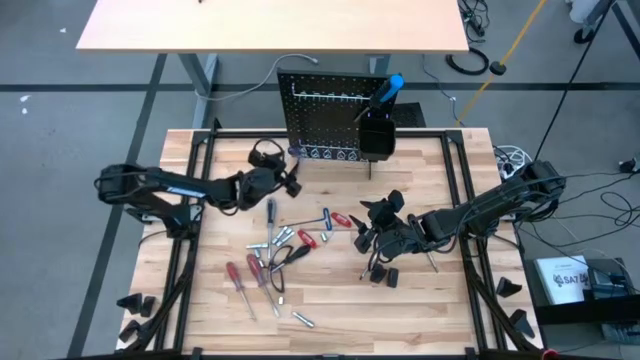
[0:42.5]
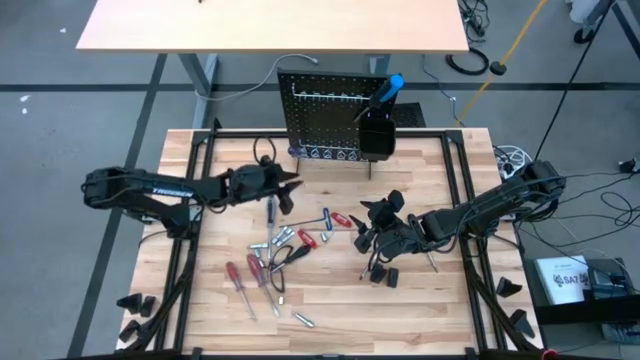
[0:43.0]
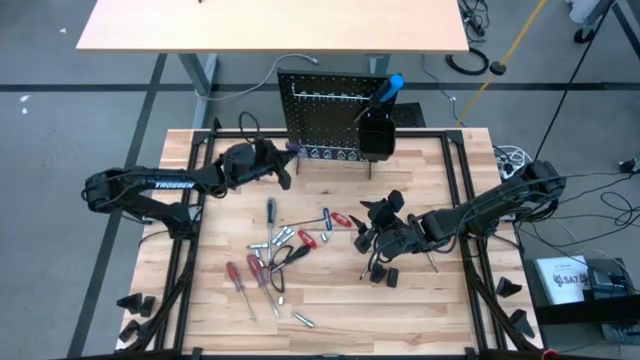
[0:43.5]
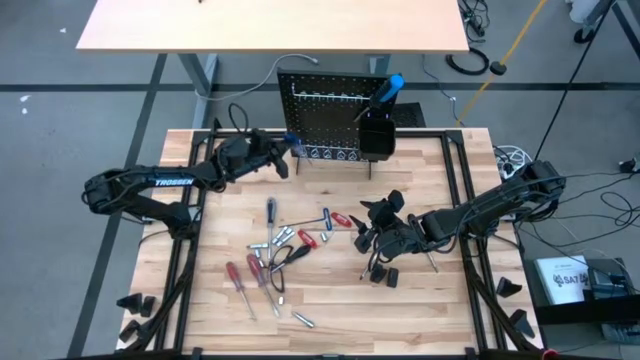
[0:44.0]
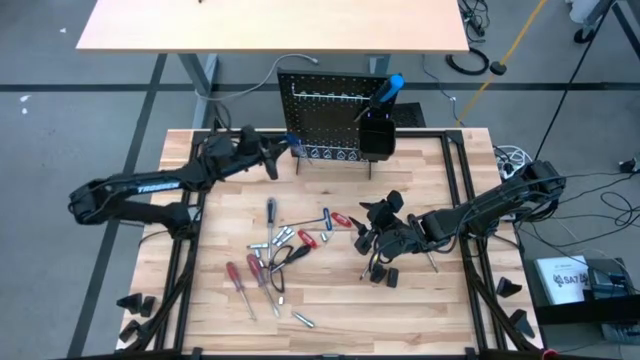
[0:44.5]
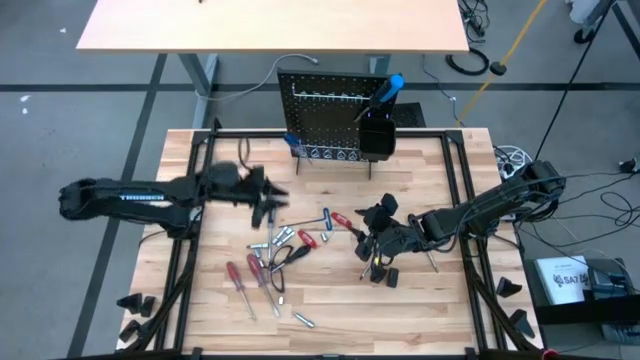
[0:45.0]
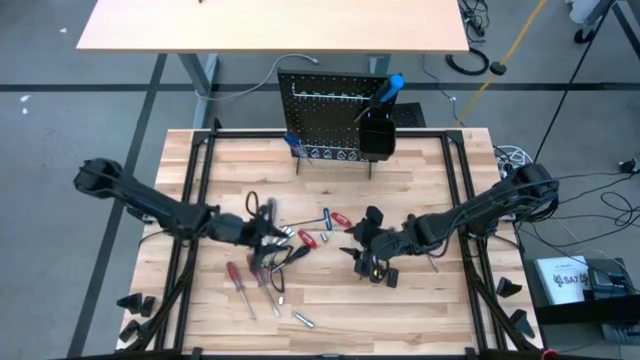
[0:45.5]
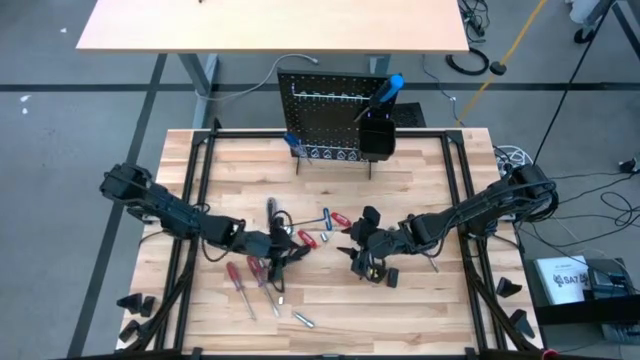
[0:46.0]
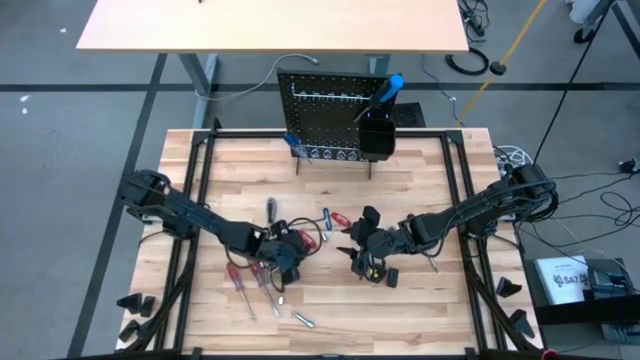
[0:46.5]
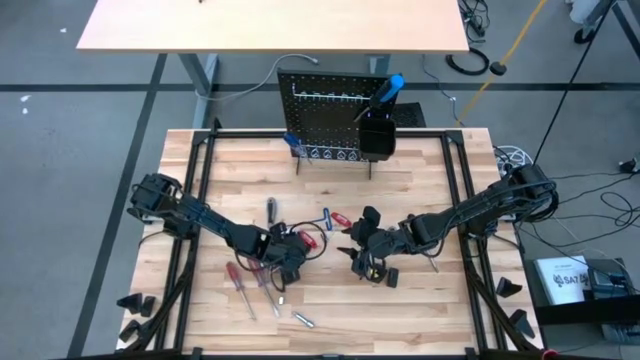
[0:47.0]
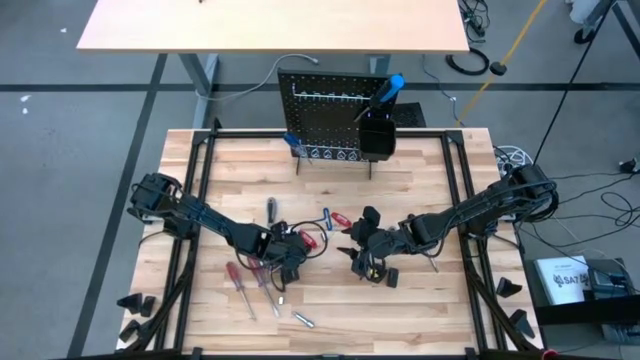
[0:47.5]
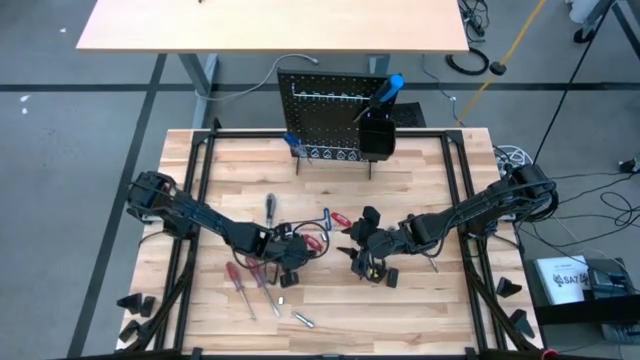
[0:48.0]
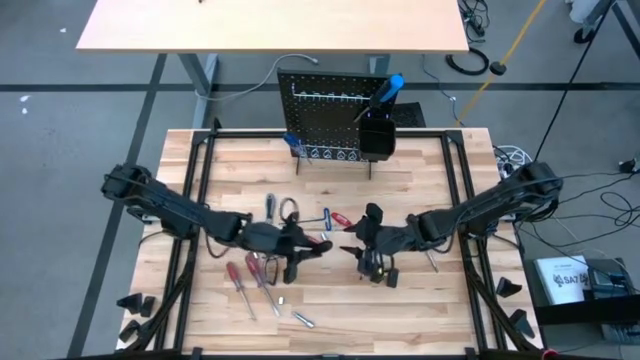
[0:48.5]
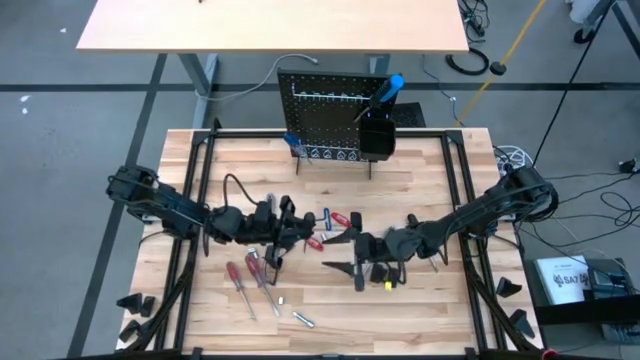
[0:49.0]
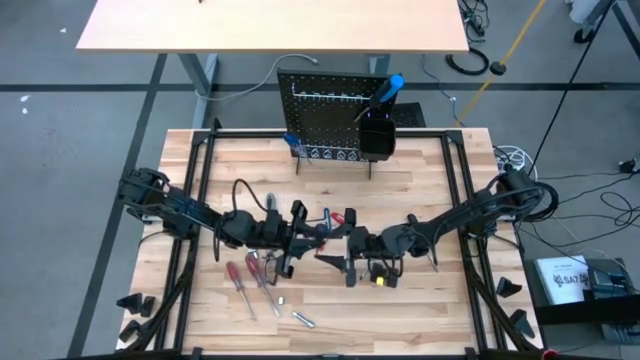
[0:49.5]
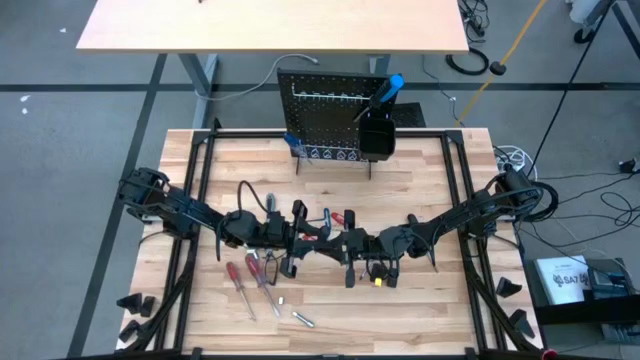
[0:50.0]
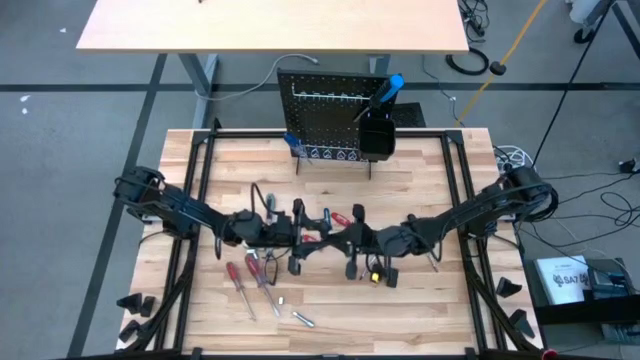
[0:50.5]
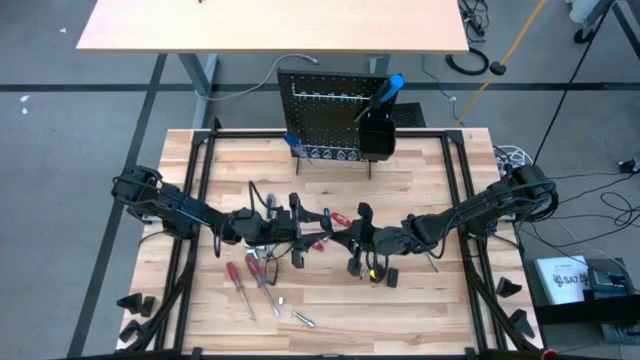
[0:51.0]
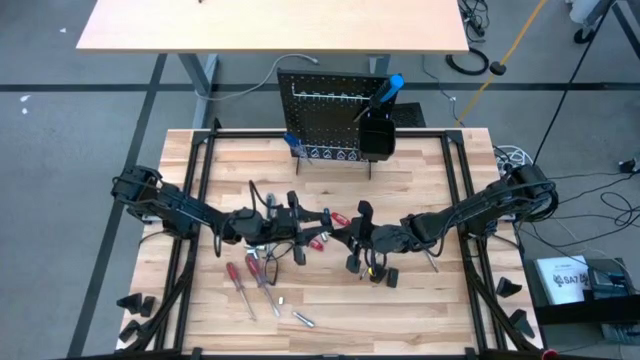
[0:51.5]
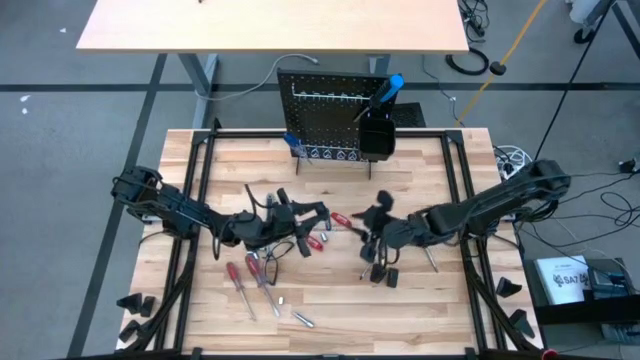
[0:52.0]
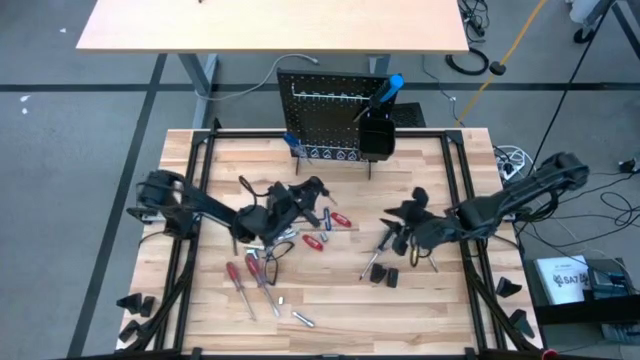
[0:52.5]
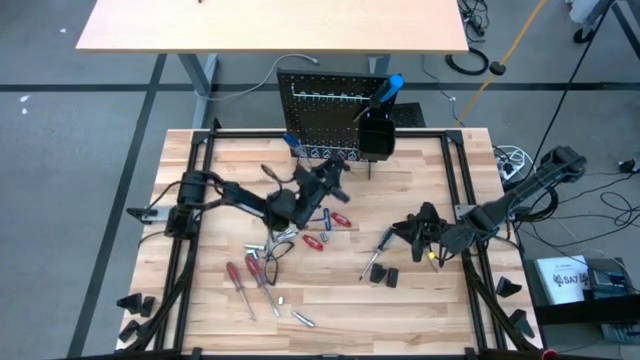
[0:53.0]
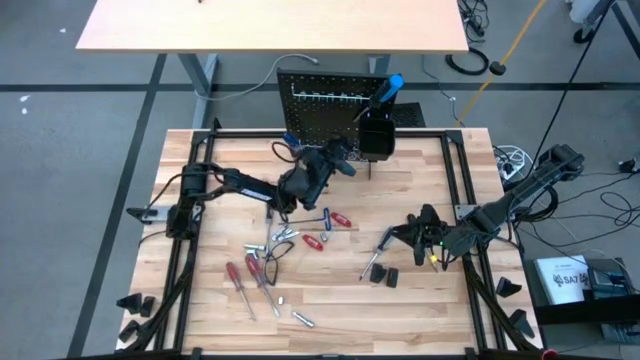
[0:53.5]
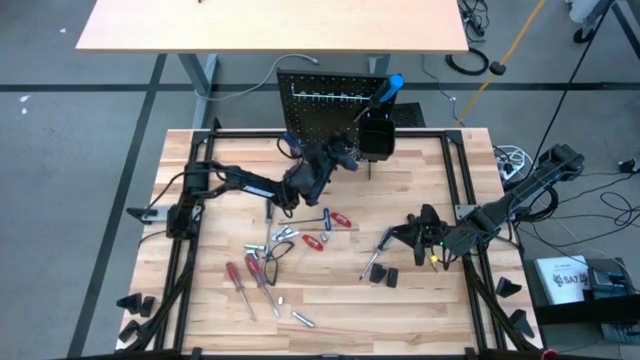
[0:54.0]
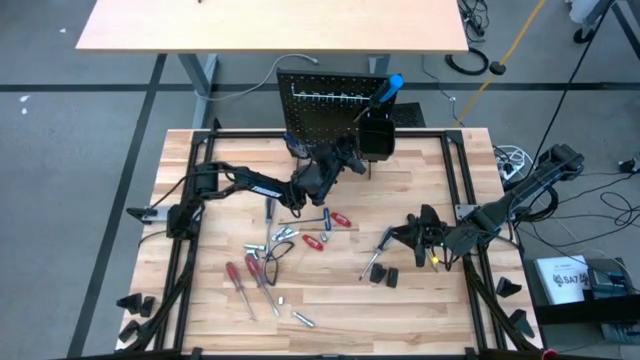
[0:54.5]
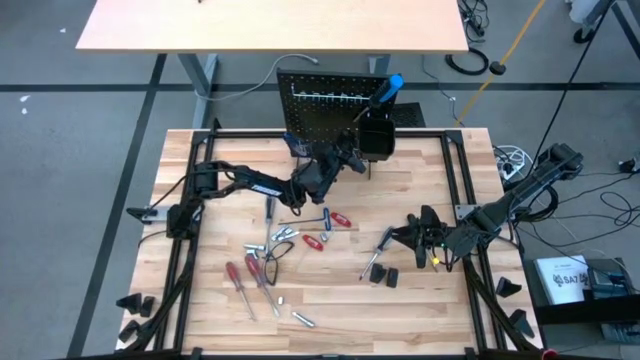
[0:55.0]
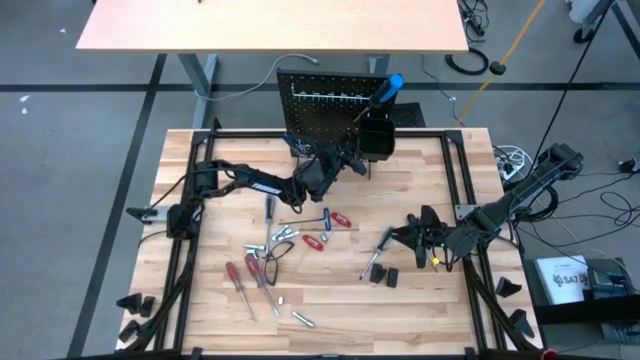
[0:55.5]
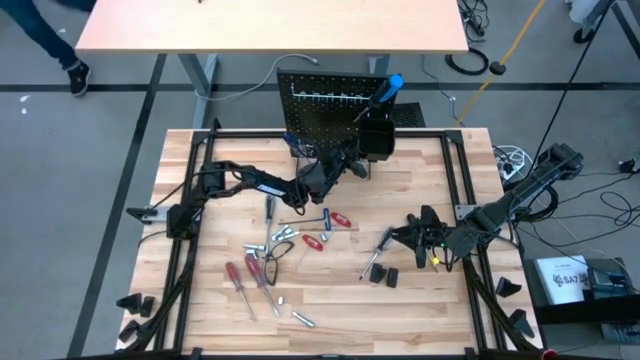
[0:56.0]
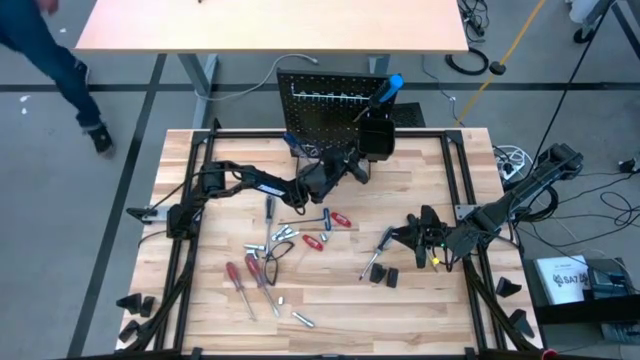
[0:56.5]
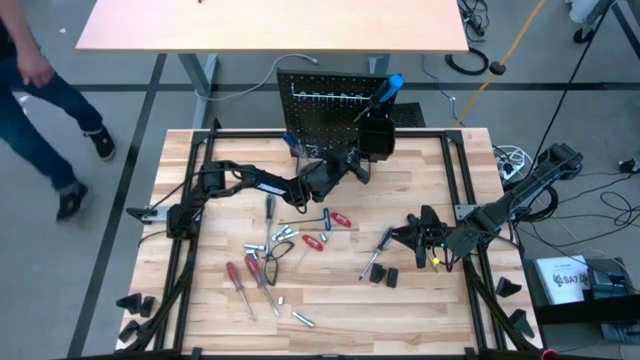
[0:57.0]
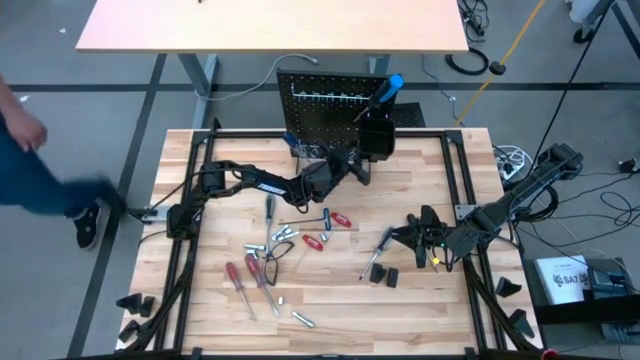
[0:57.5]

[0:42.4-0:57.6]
Task: Hang tools onto peg board
Hang the black screwdriver onto the peg board

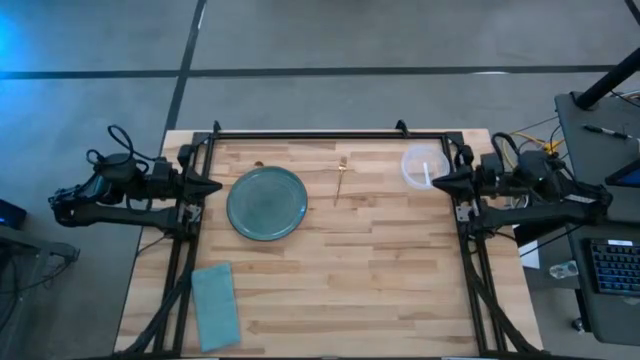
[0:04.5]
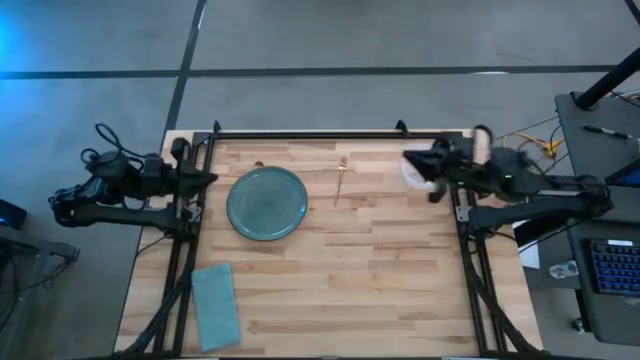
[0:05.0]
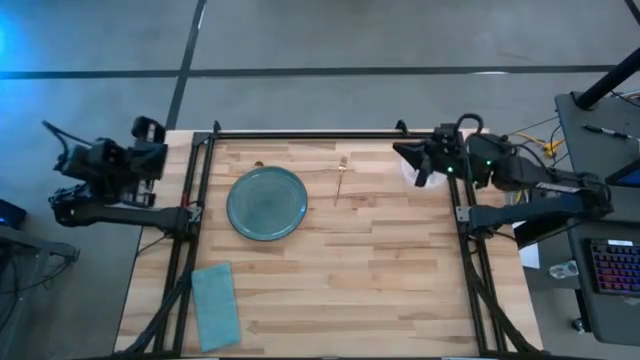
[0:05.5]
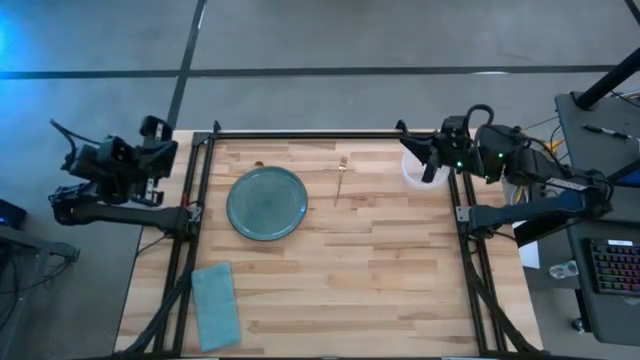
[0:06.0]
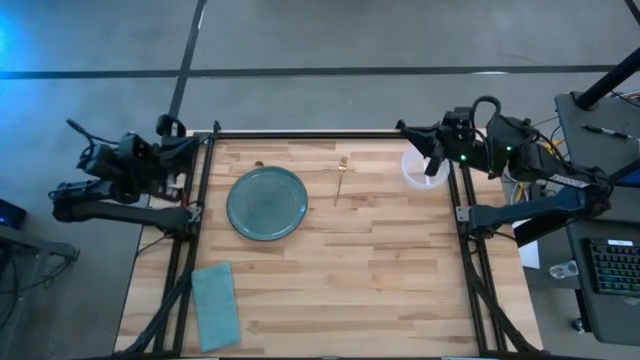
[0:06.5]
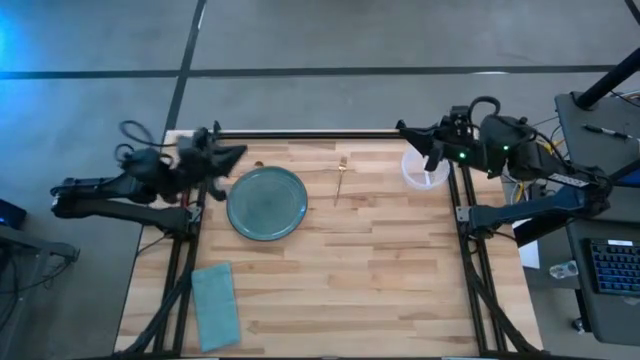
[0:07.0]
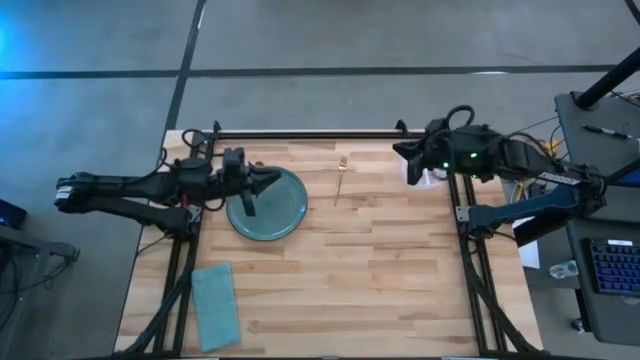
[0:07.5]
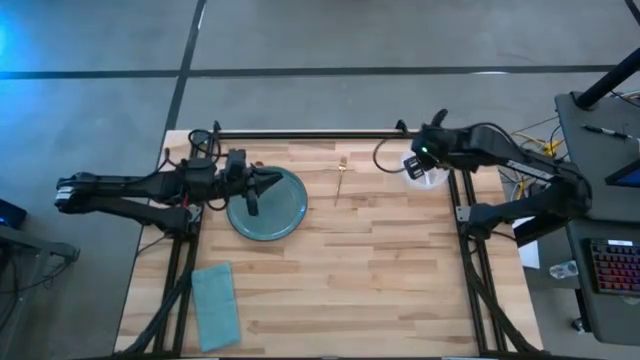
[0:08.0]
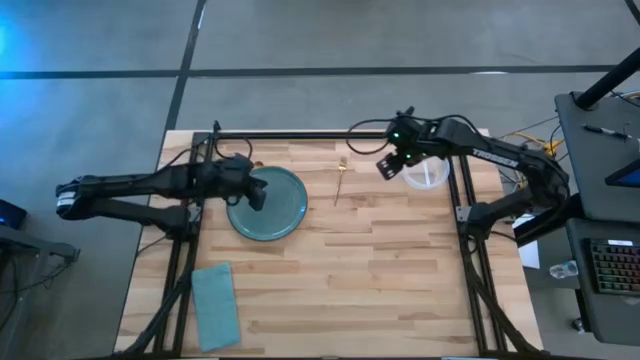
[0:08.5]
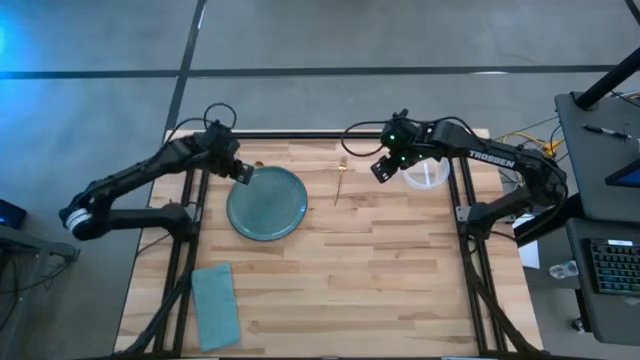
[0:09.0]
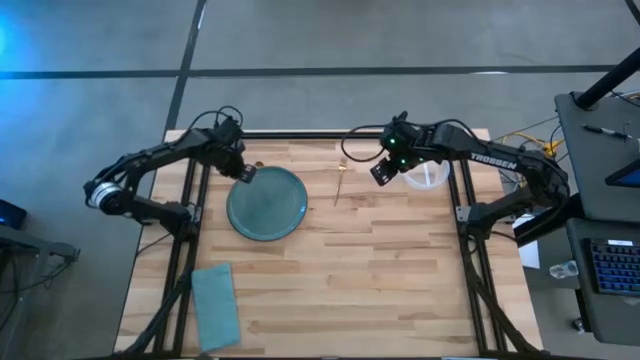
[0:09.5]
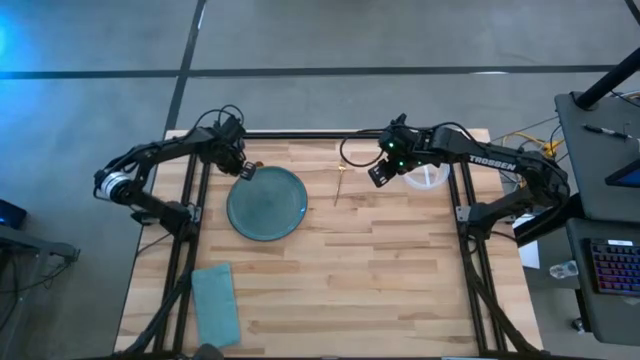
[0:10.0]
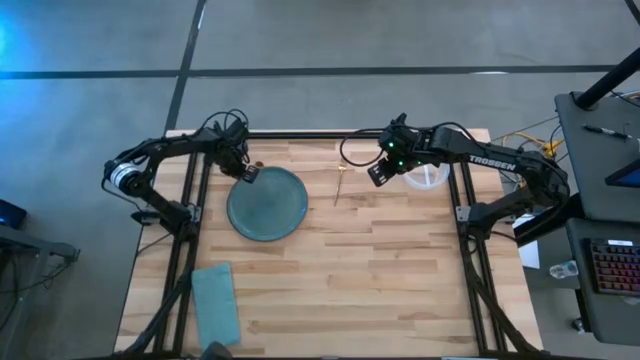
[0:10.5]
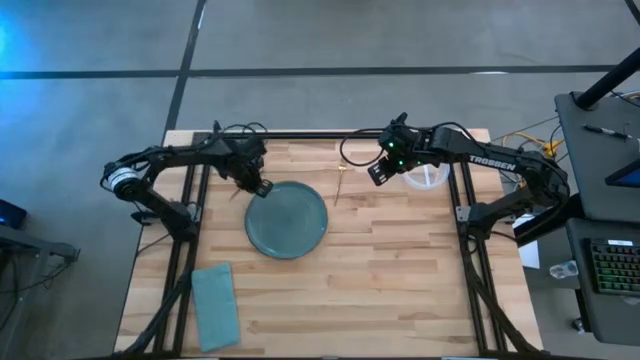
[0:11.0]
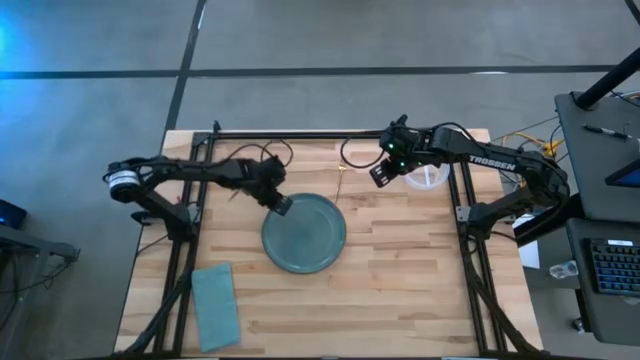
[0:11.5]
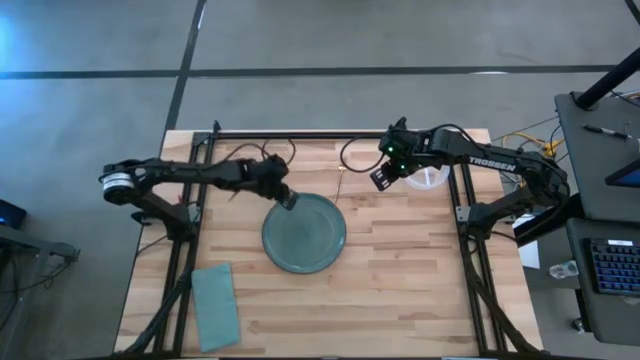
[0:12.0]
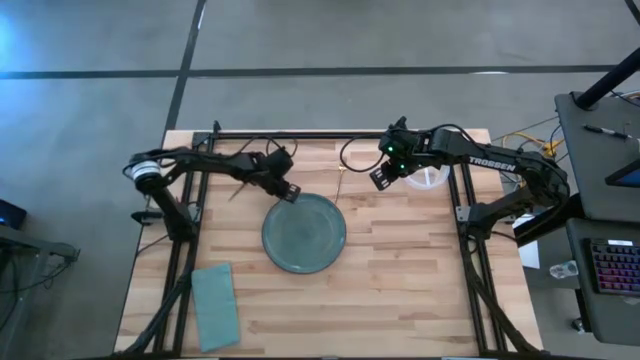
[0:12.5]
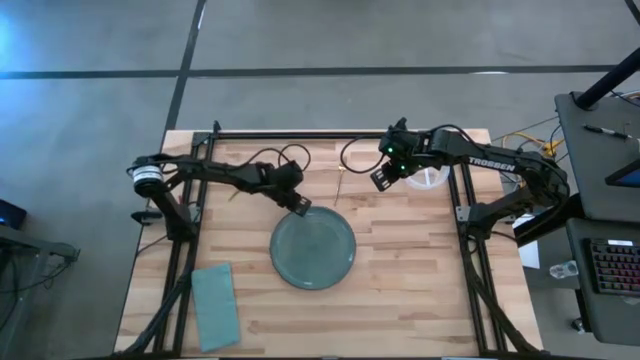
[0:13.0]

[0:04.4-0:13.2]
Task: Set table place
Move the plate to the center of the table
